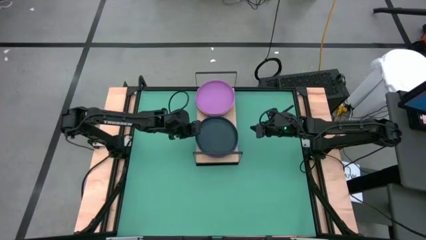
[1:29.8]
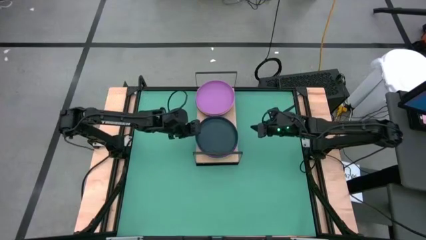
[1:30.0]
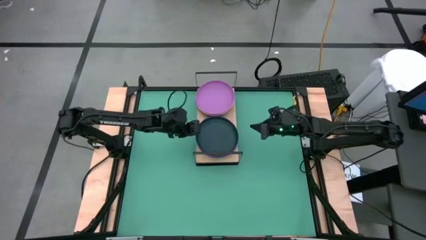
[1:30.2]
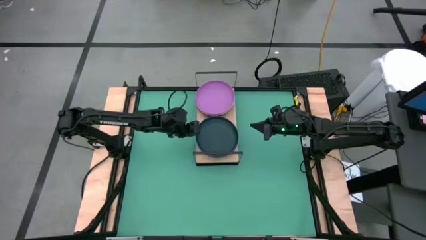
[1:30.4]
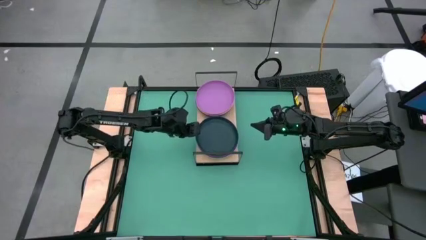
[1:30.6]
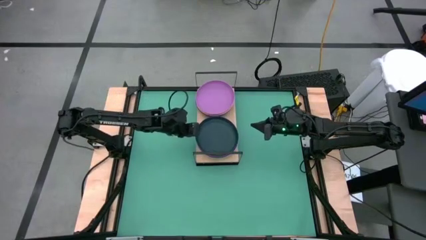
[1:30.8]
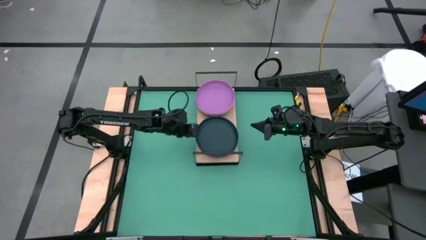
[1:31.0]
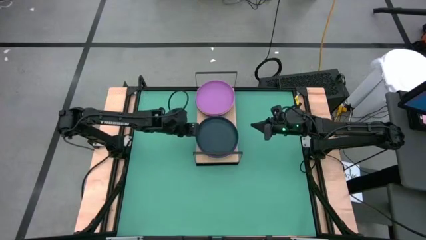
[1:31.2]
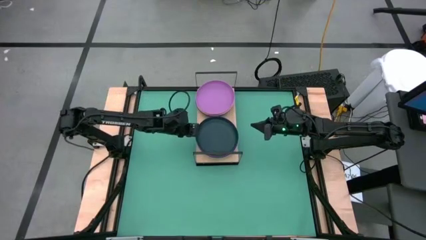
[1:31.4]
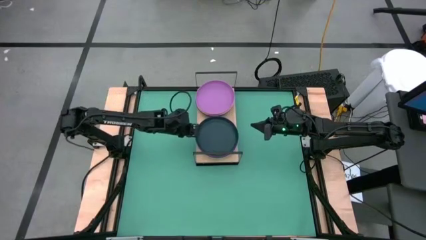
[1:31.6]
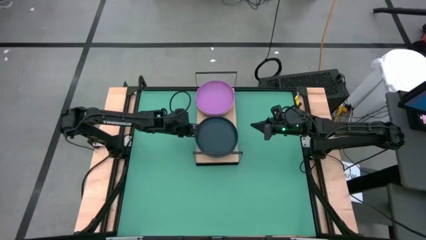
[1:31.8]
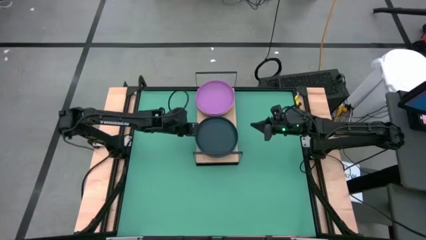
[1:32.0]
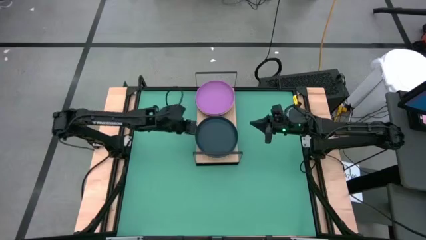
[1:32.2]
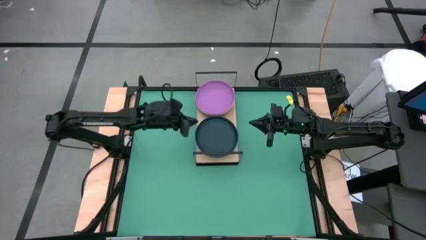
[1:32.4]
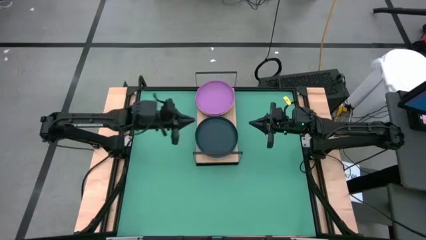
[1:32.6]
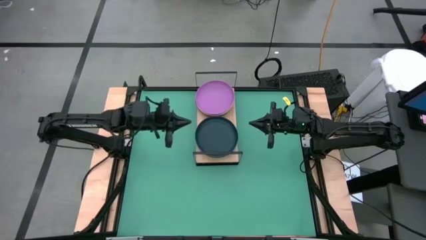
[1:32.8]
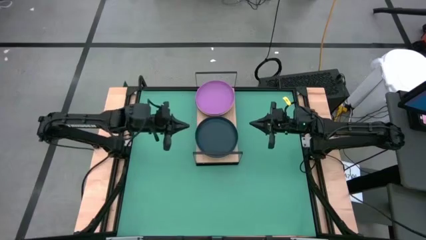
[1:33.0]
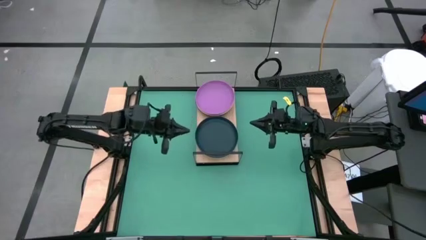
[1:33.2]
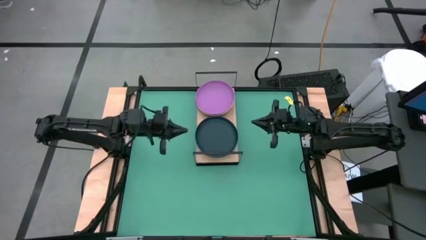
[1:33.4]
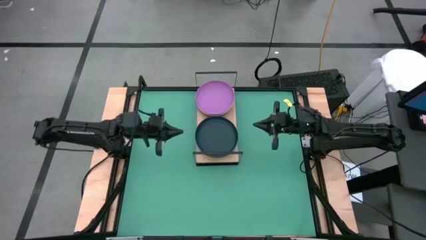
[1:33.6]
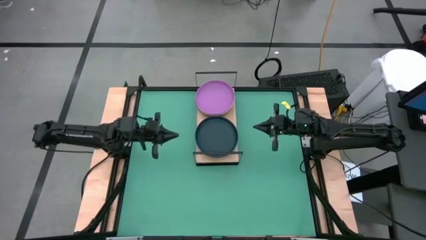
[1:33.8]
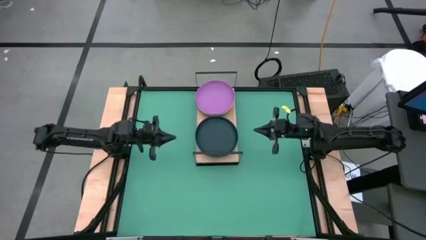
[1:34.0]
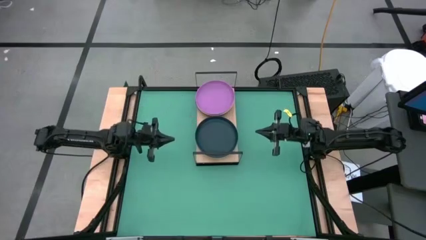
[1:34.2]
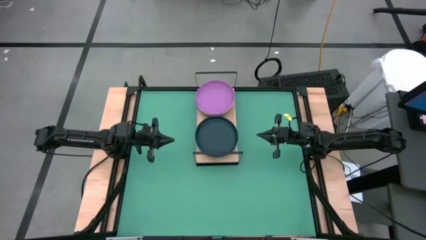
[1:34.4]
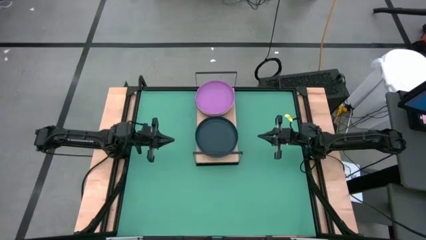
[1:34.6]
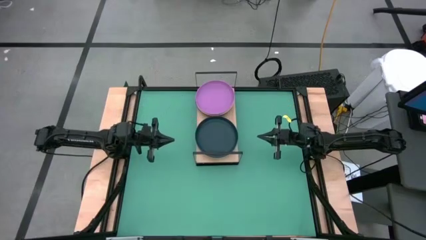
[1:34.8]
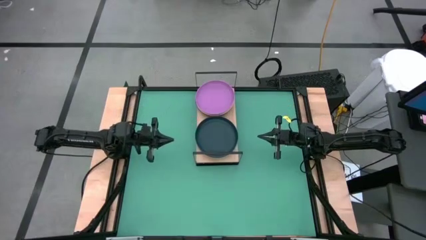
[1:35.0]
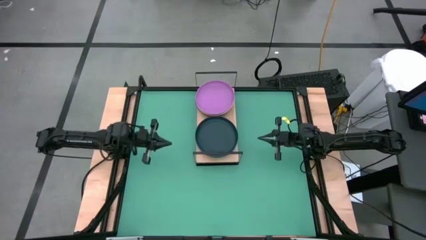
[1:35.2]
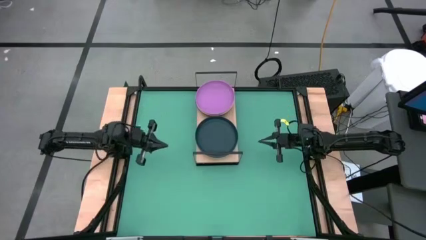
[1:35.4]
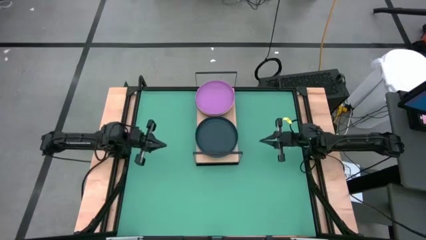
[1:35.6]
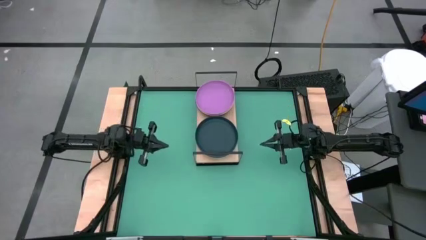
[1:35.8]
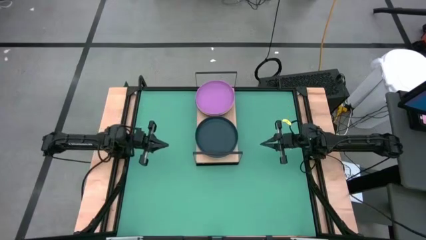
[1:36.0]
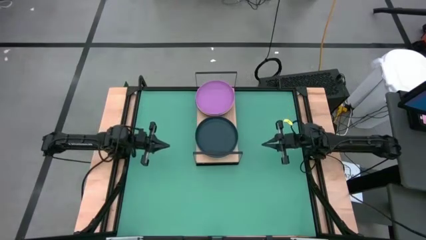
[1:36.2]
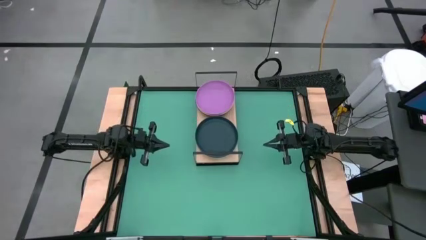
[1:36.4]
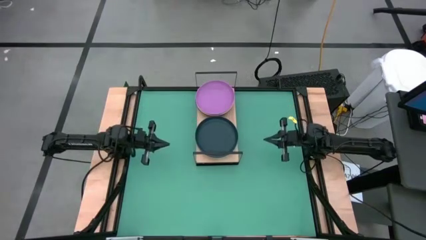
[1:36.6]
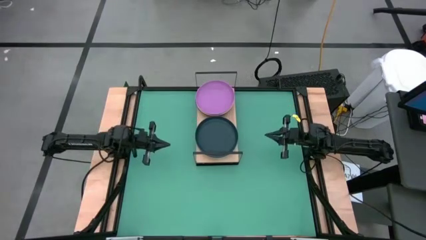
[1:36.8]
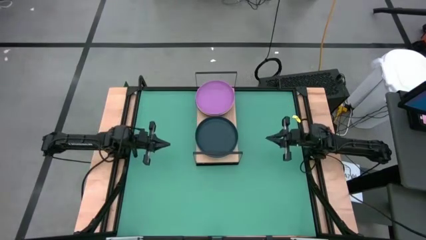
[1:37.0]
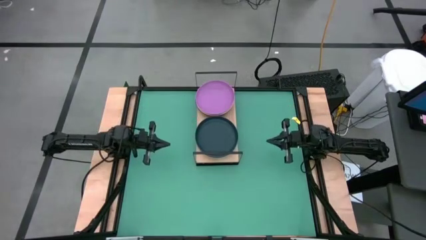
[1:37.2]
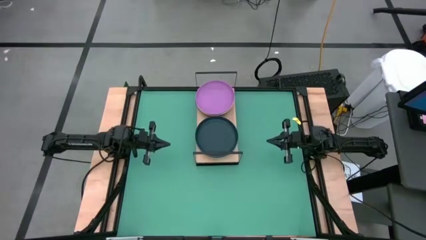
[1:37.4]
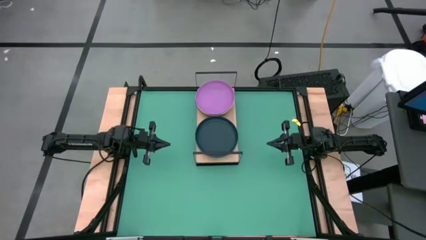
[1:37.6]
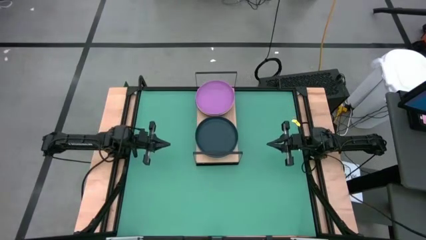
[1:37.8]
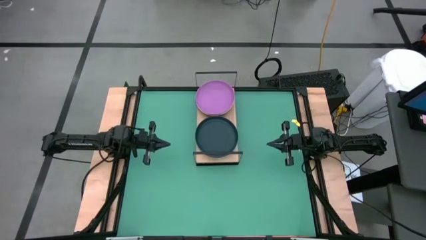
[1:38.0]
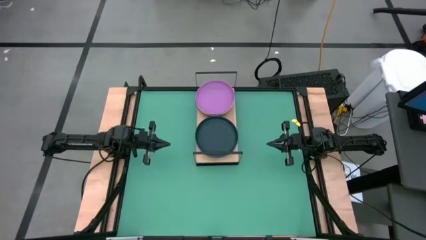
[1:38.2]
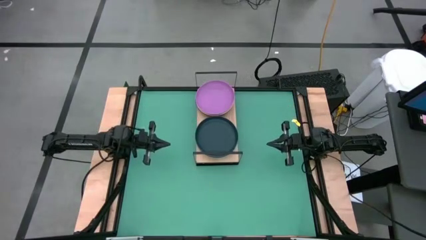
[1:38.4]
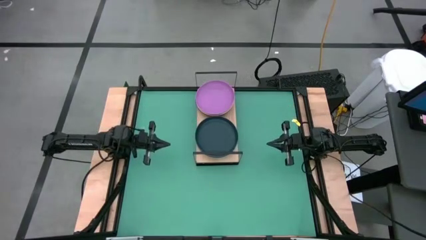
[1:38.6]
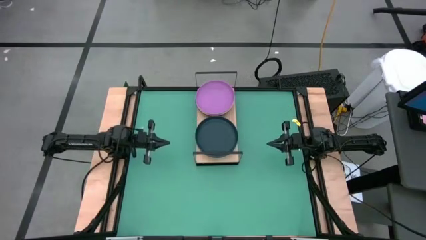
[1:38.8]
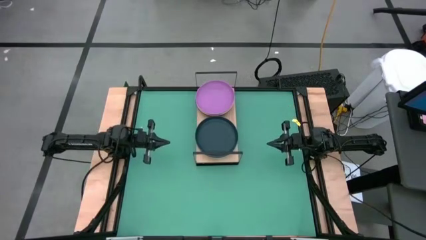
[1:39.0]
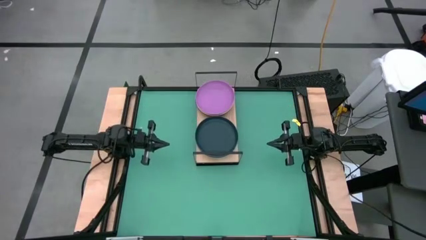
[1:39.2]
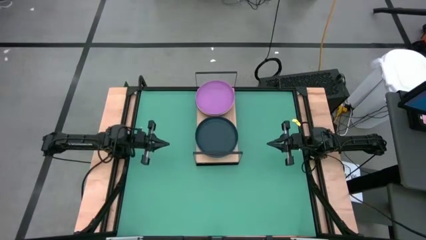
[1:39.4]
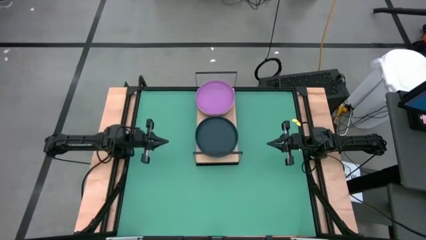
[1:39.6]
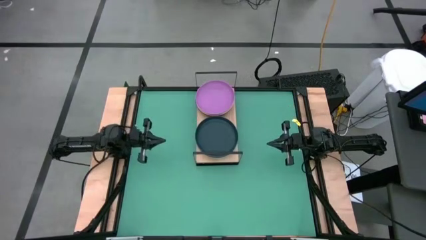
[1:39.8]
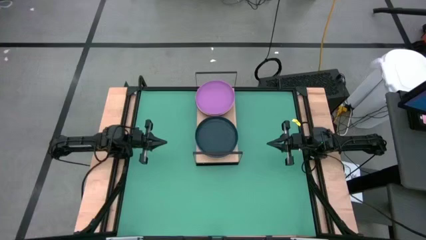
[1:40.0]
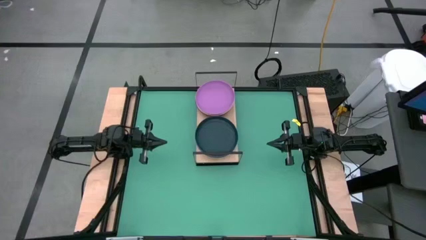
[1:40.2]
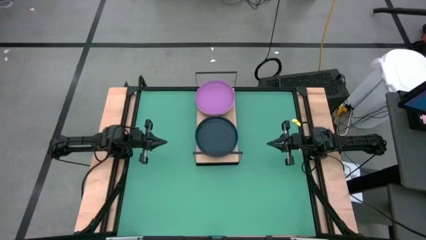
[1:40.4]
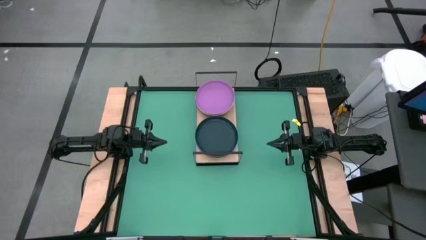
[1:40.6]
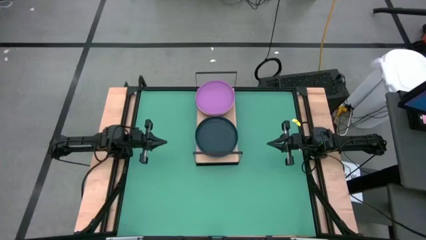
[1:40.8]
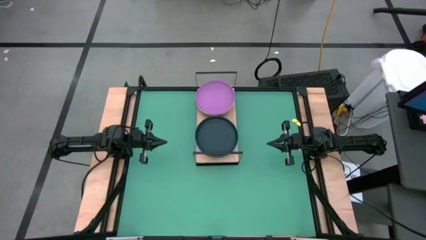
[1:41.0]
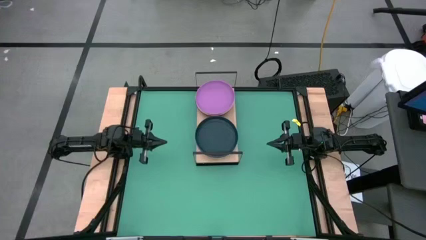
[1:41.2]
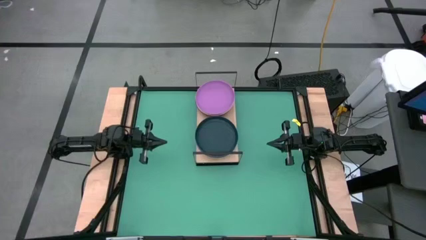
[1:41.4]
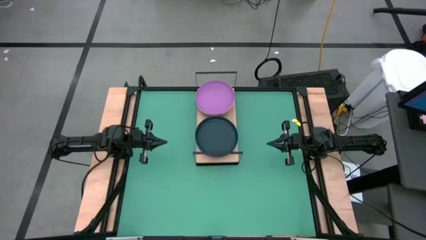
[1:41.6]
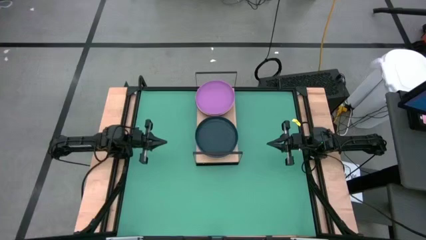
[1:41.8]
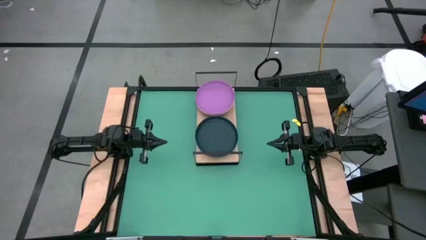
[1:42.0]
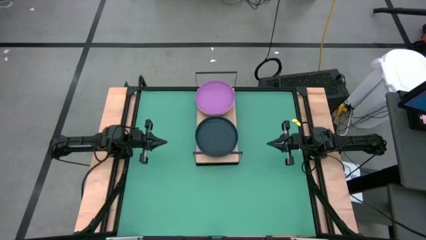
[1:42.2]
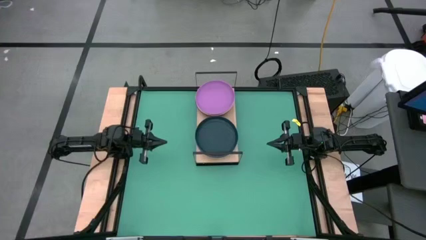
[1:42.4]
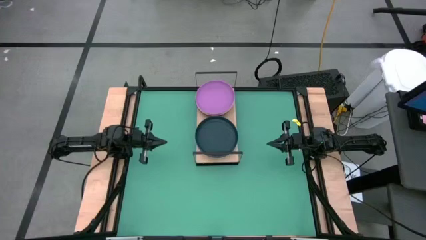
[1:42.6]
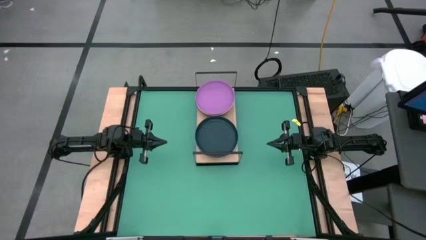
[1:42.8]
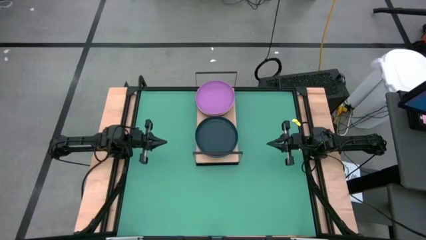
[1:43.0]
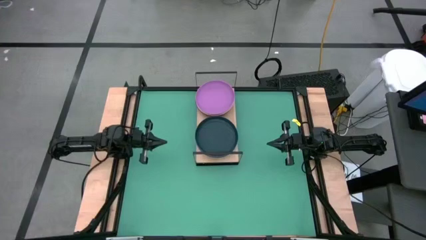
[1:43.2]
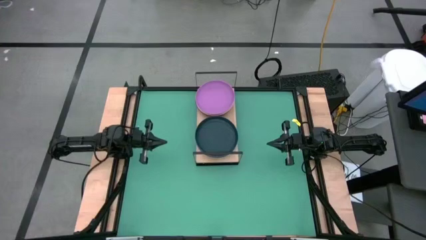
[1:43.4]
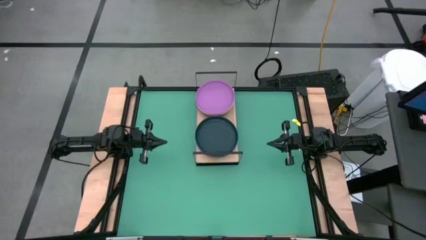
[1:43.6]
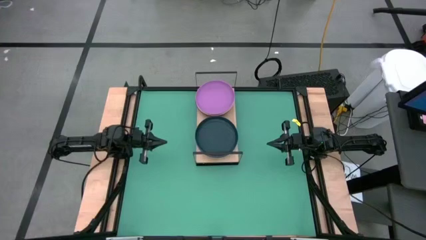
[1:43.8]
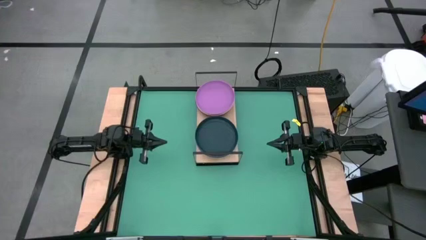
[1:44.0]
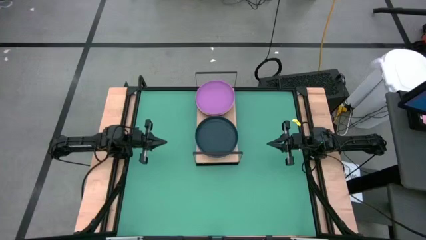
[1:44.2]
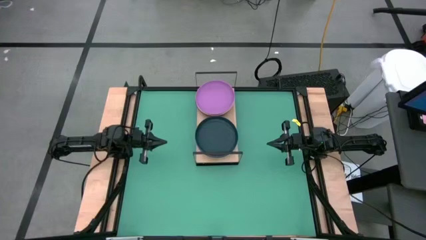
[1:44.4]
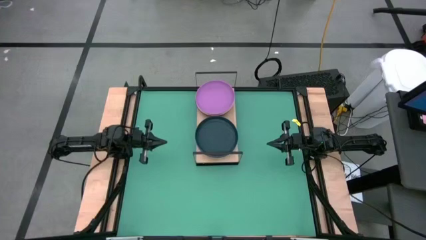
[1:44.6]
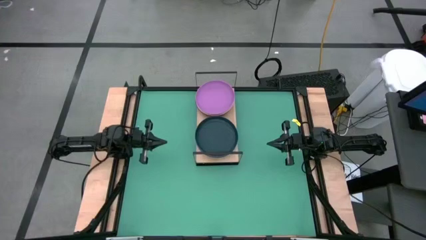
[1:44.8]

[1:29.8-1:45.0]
Task: Place and stack plates onto a shelf
Return to Home Position
